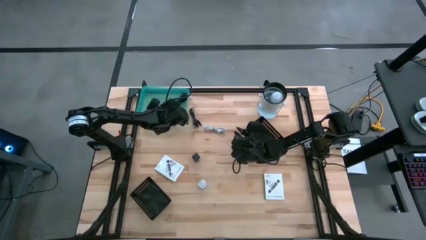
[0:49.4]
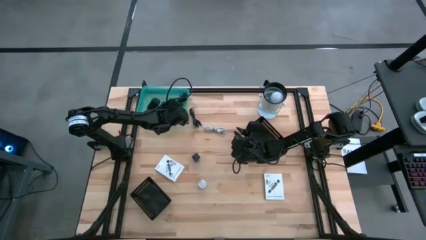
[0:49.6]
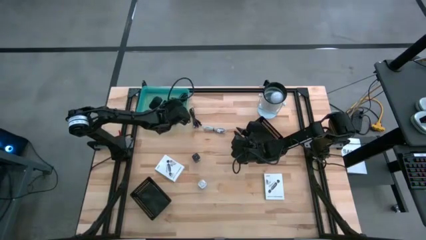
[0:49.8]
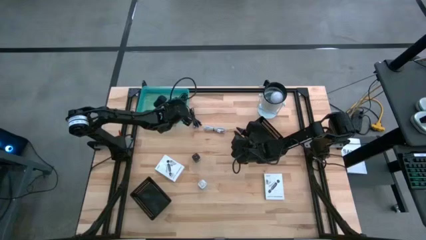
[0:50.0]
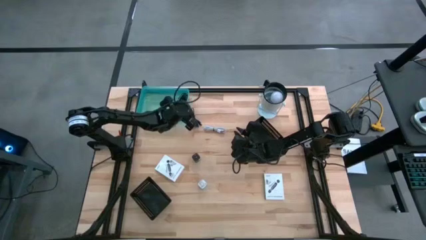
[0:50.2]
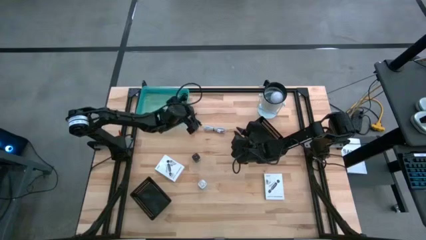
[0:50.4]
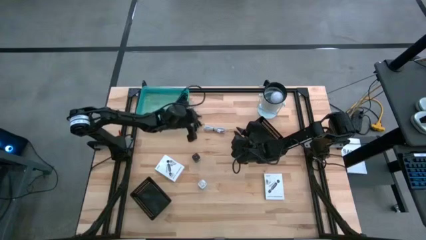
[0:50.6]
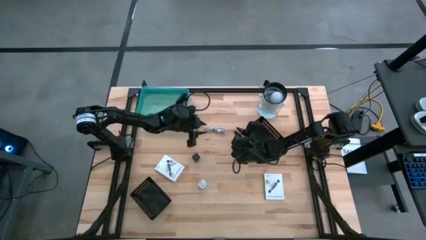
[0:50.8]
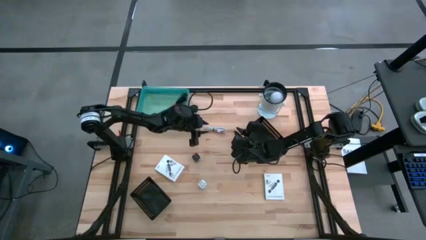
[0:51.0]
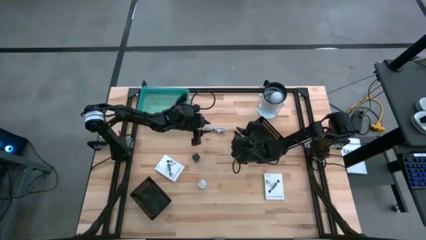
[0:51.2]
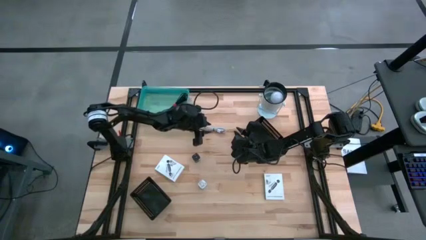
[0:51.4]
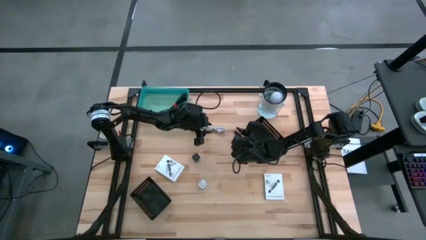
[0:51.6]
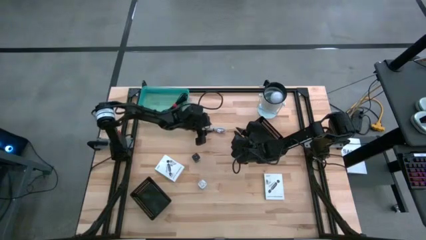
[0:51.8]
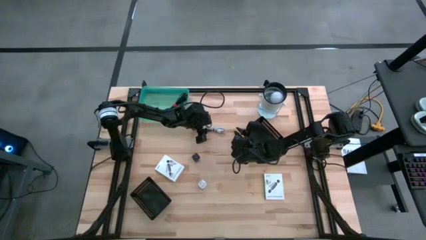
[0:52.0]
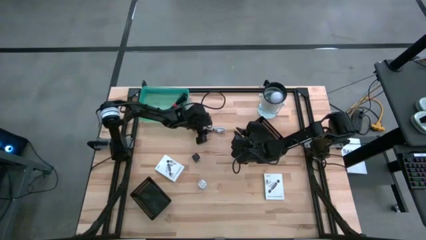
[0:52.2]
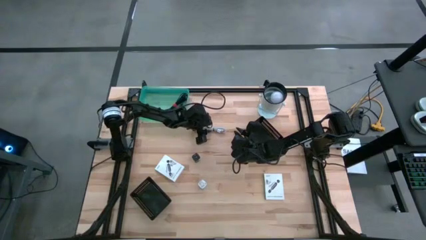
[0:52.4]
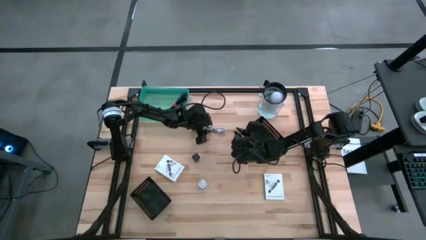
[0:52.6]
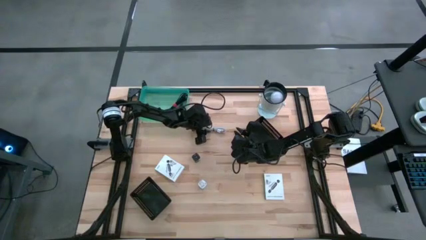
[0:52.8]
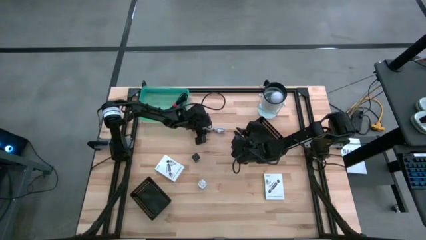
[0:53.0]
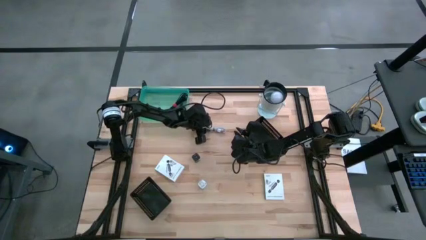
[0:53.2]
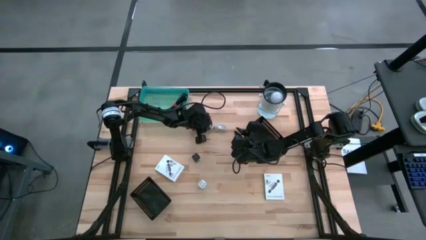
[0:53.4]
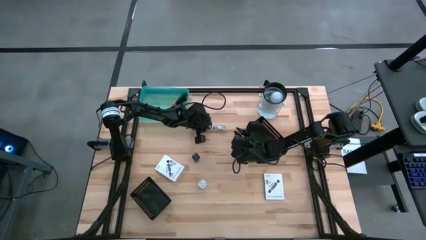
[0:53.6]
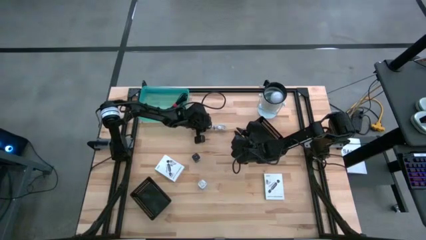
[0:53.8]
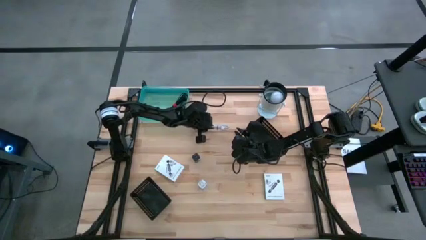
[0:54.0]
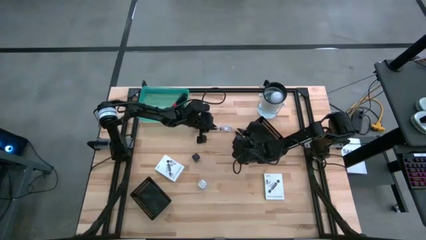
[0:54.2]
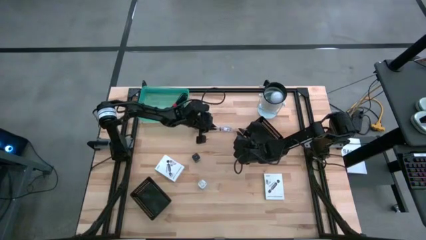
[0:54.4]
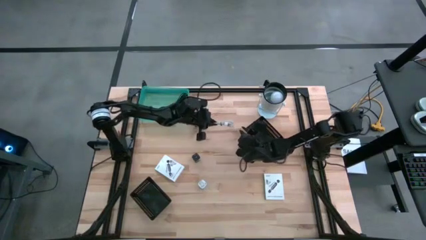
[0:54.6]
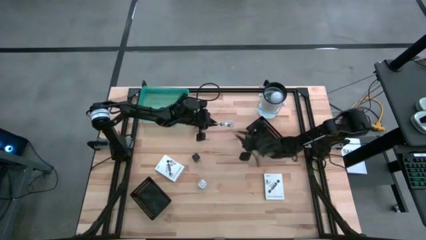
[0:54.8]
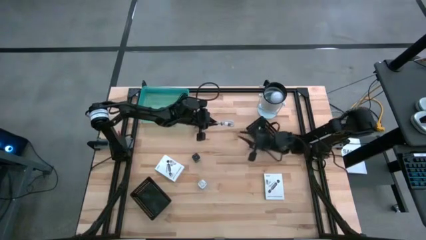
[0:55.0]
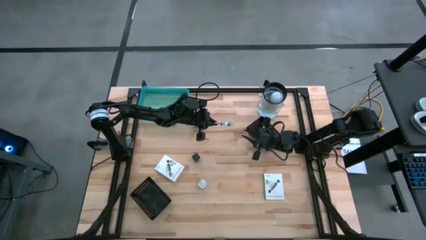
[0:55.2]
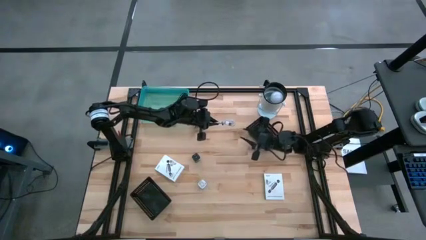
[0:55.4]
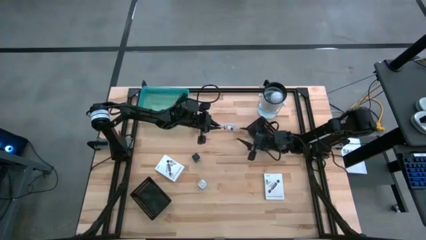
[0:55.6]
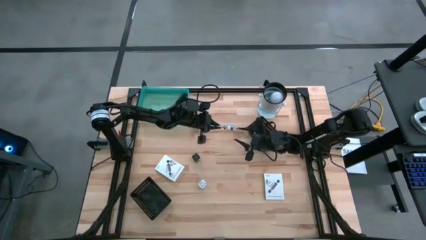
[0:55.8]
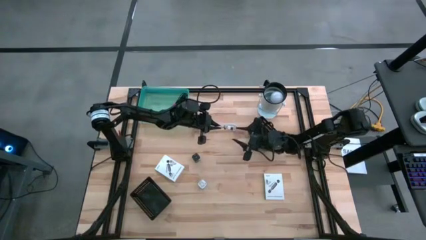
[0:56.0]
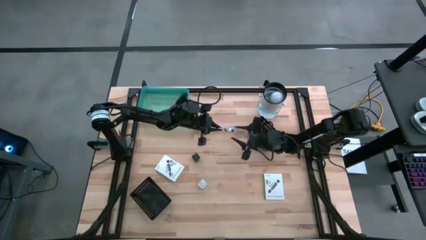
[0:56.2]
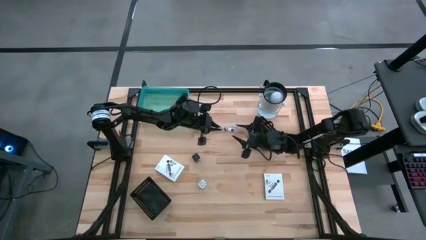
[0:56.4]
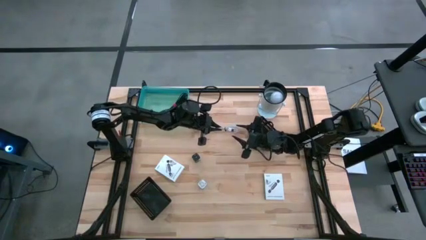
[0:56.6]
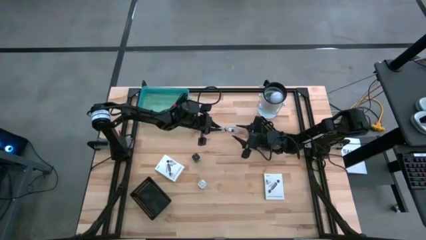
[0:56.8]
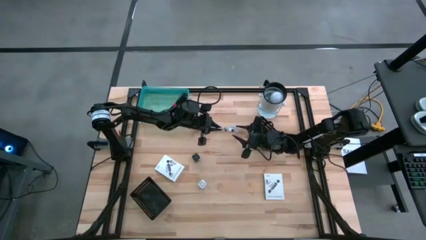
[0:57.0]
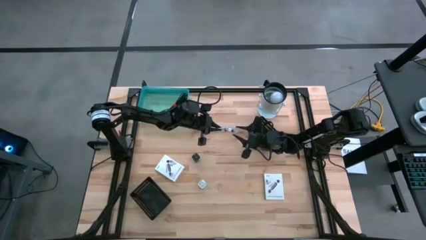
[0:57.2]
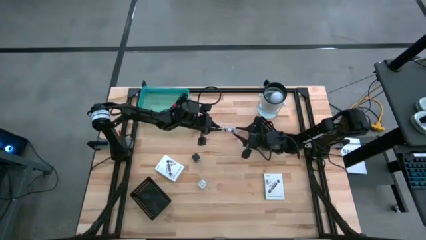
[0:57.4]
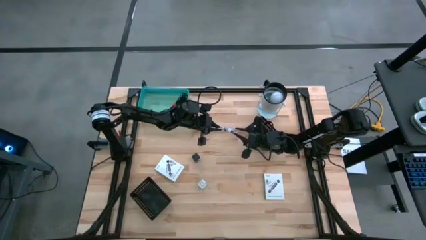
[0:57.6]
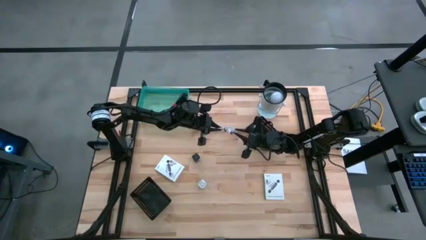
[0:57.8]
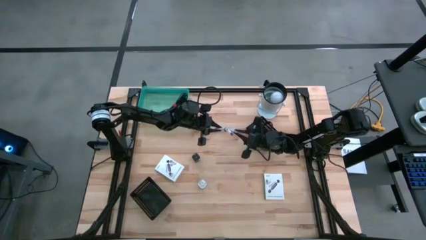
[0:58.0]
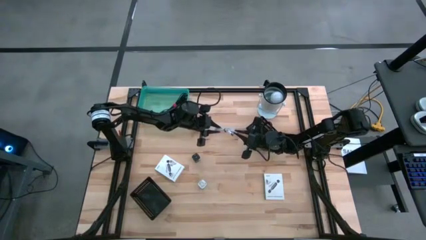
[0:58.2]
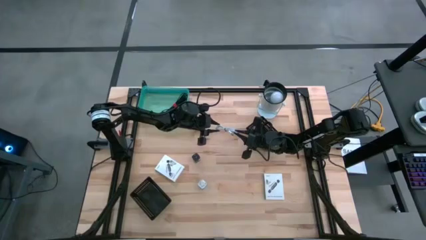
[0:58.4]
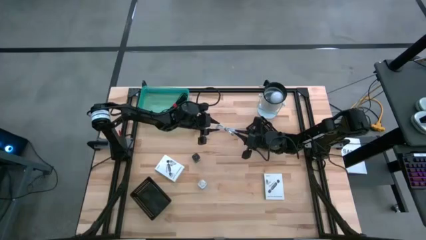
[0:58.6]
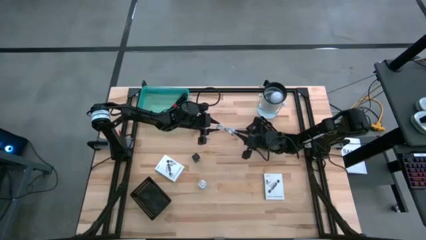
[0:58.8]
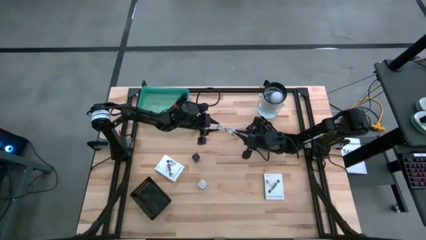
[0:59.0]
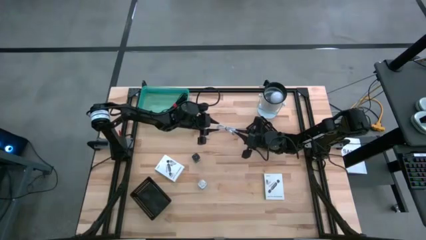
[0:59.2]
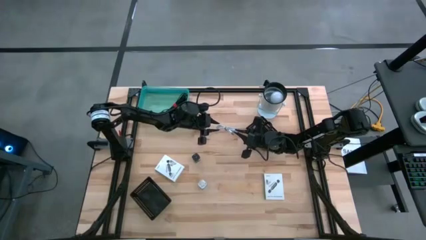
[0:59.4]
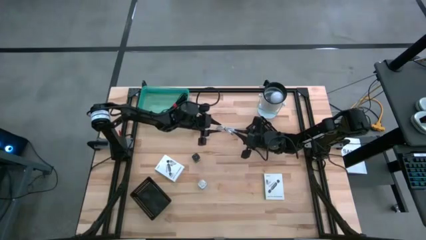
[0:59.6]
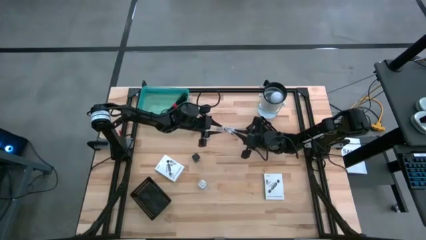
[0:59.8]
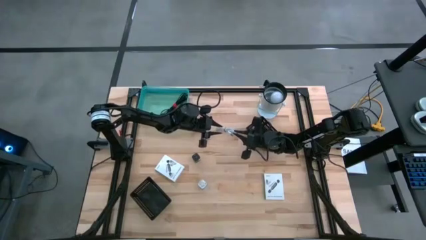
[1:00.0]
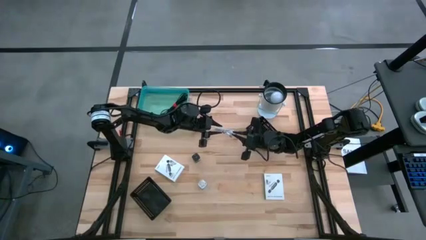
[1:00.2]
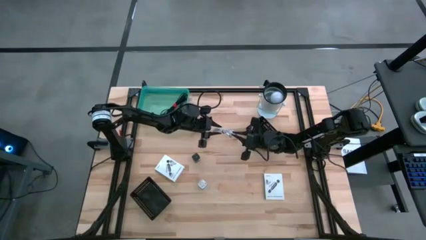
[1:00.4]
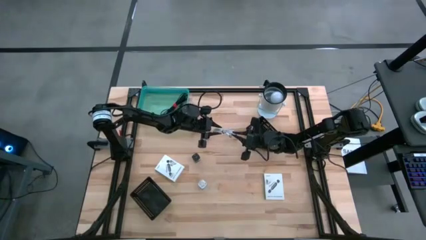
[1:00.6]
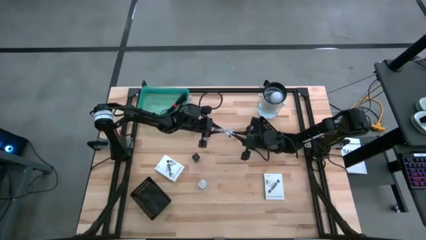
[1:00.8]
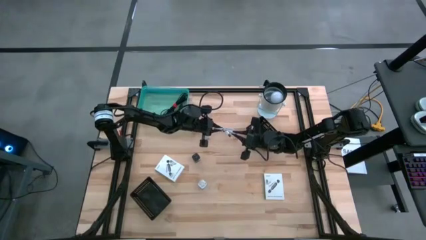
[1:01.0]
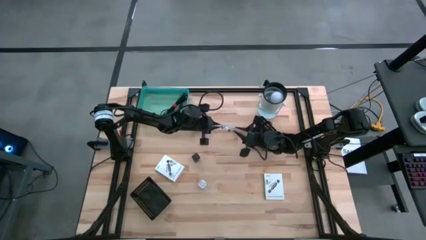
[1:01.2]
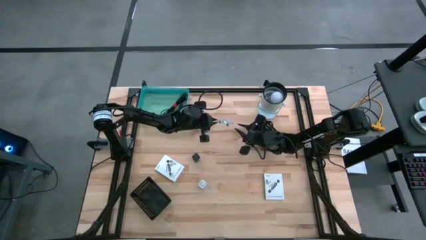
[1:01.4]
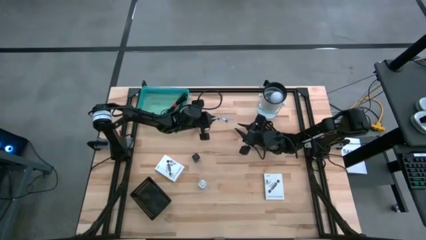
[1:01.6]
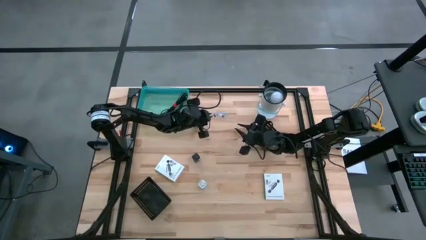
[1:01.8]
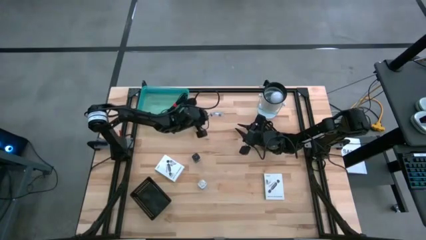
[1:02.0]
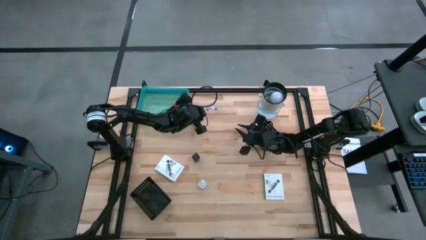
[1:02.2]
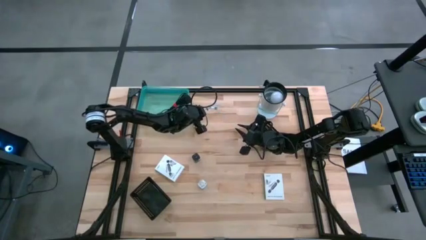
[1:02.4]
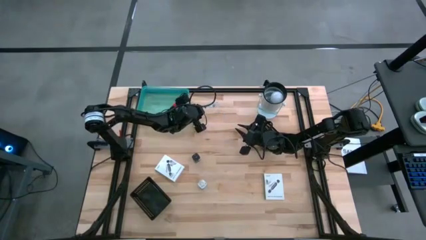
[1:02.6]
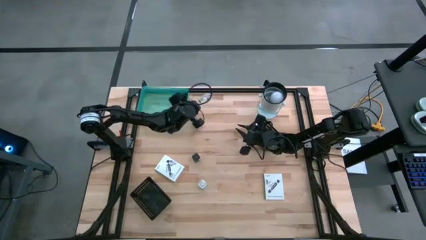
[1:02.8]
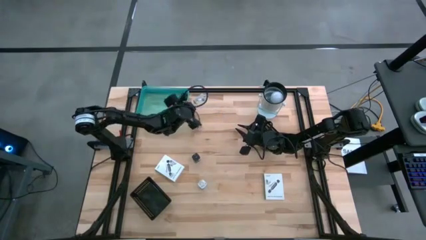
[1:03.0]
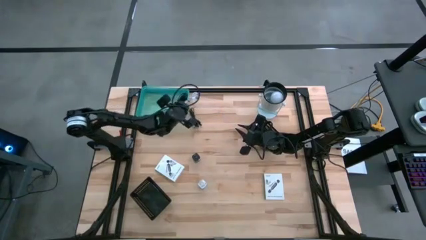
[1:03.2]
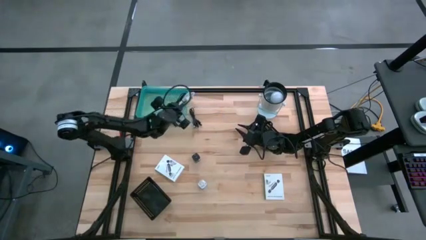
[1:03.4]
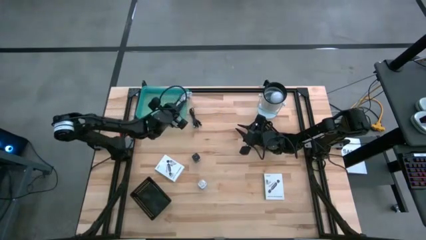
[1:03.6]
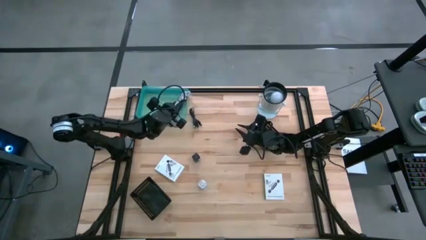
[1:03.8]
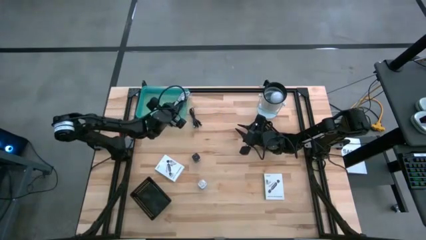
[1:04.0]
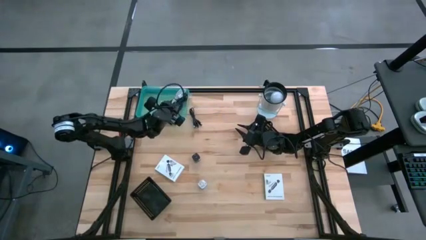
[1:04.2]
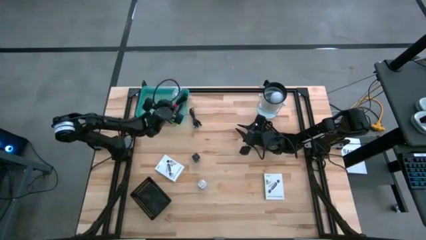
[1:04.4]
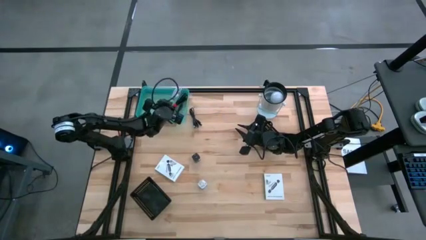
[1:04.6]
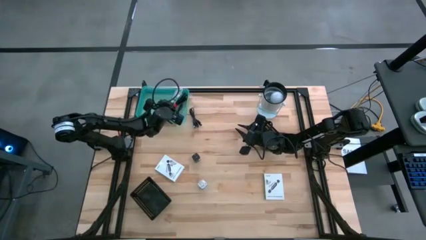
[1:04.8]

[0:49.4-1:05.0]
Task: Pick and place items into bin
Put the white charger cable into the green bin
